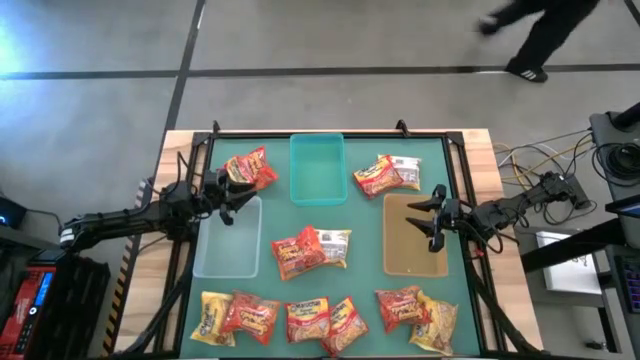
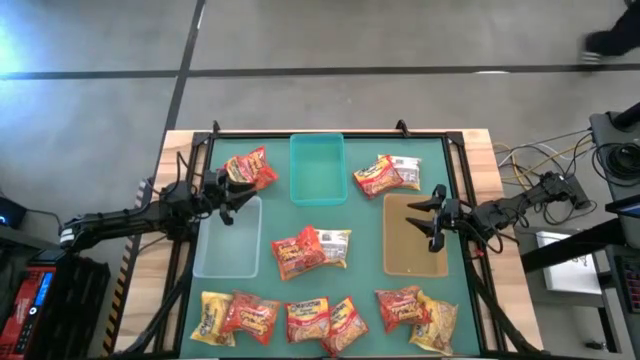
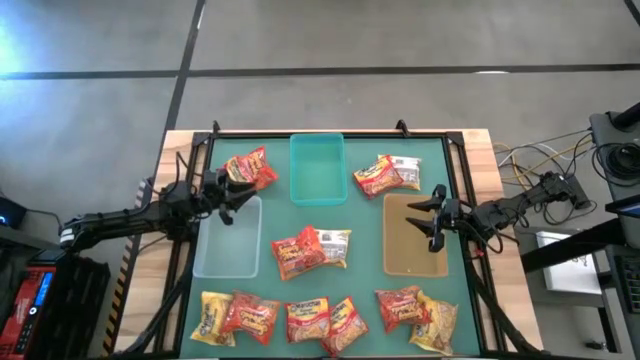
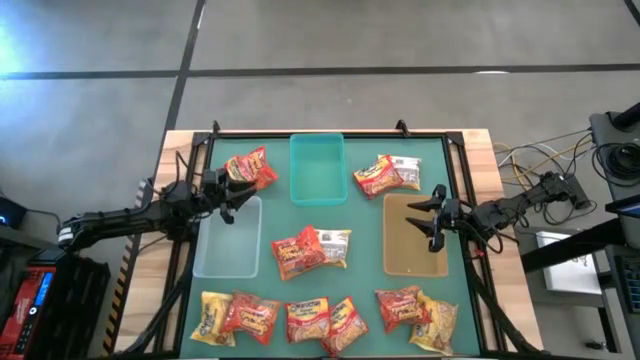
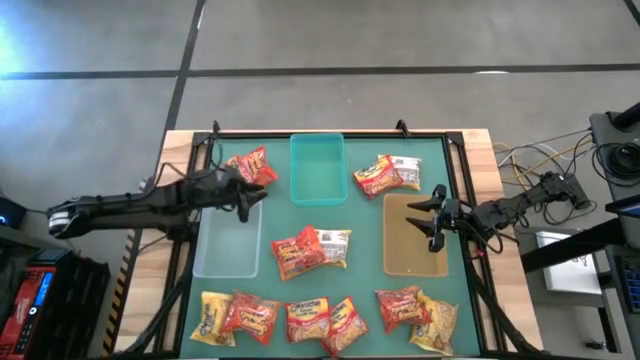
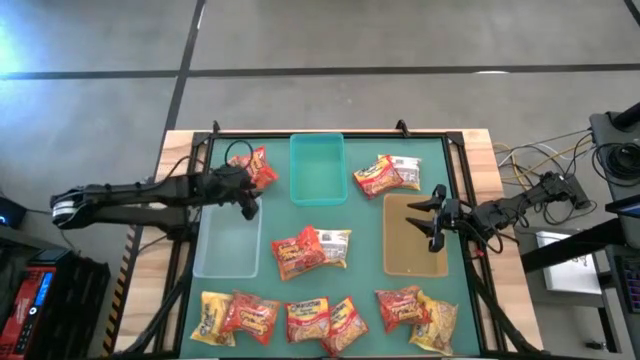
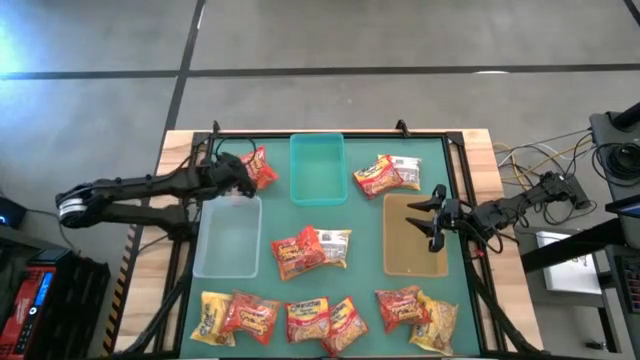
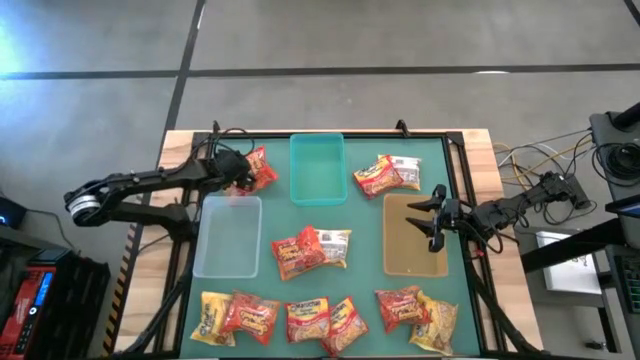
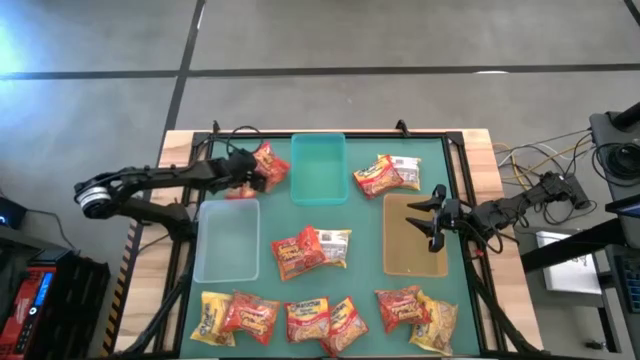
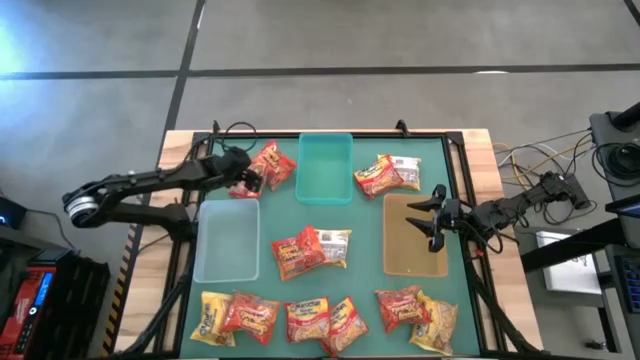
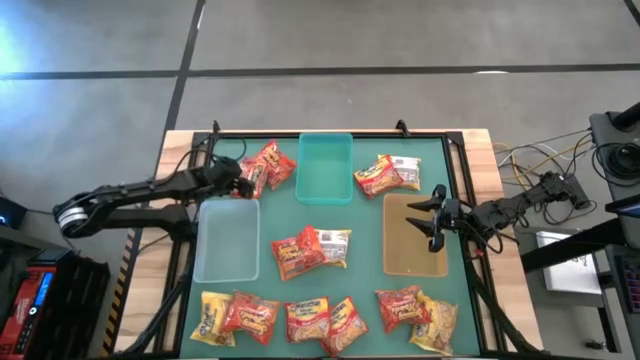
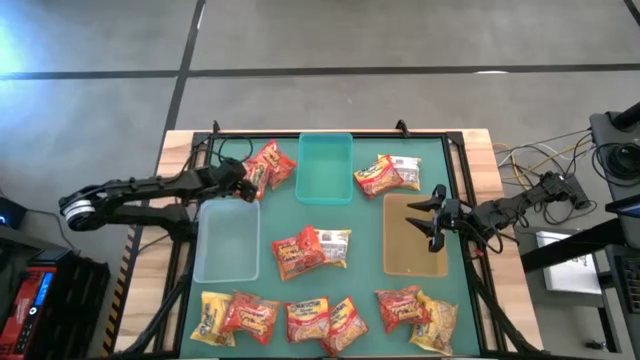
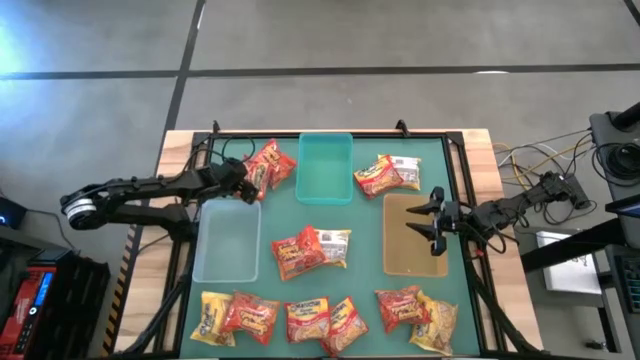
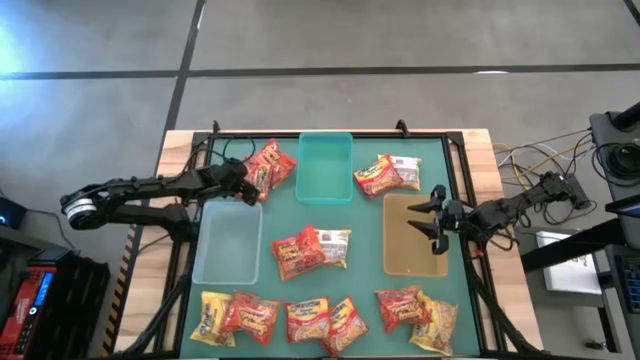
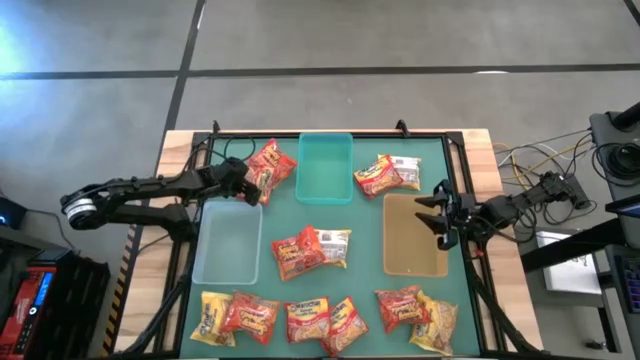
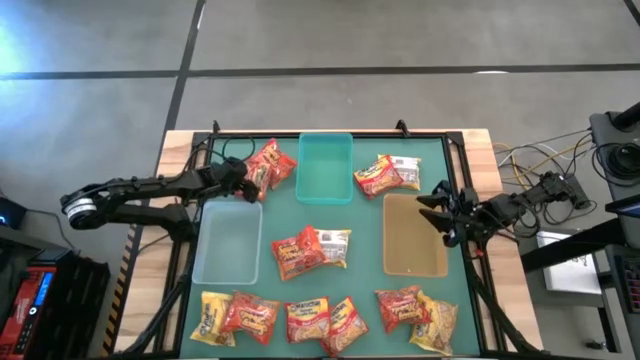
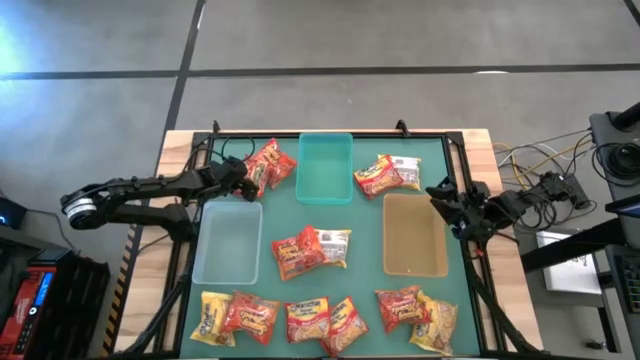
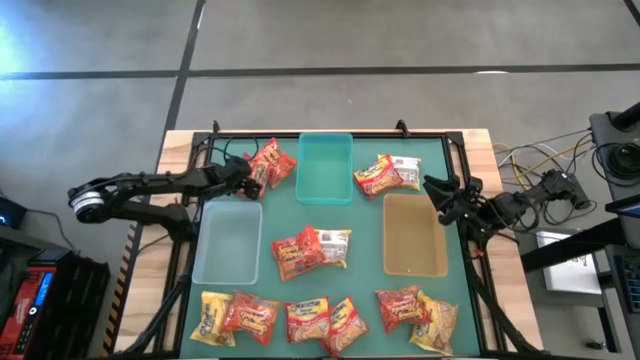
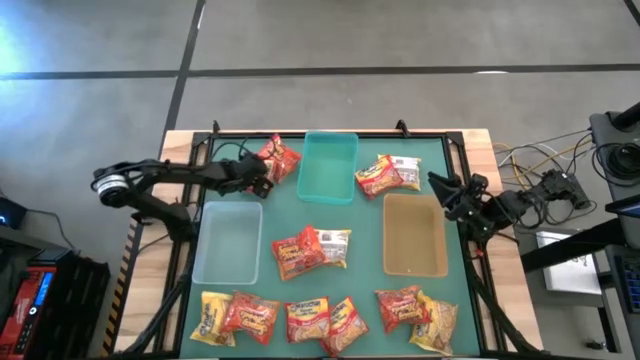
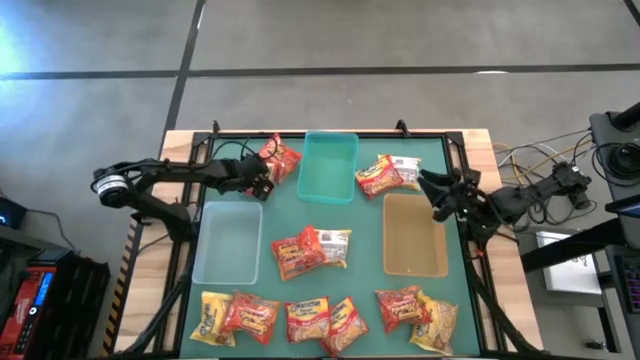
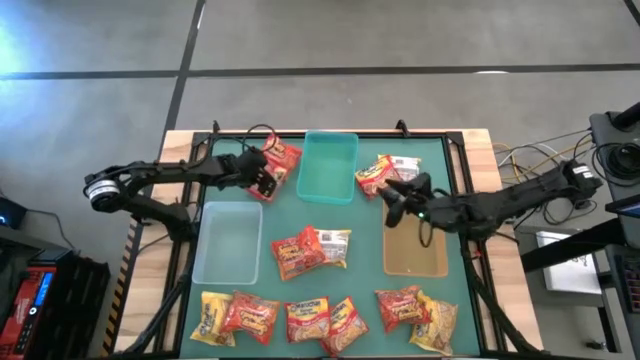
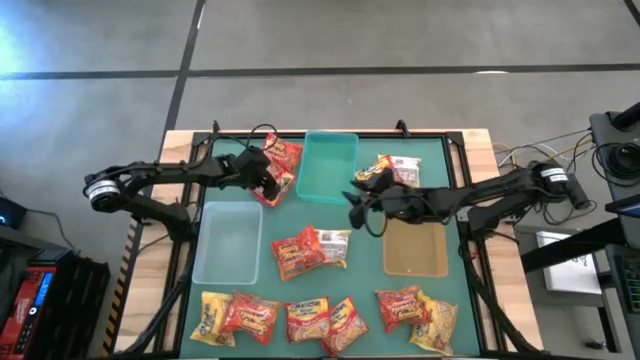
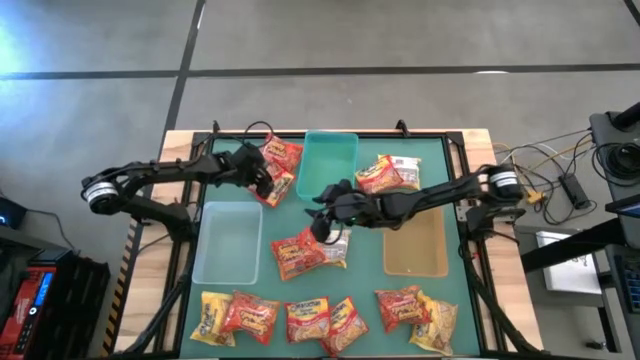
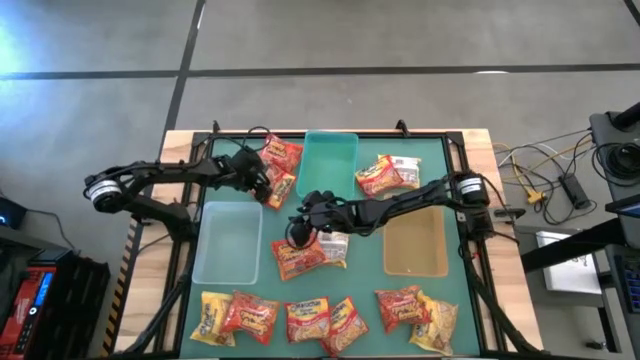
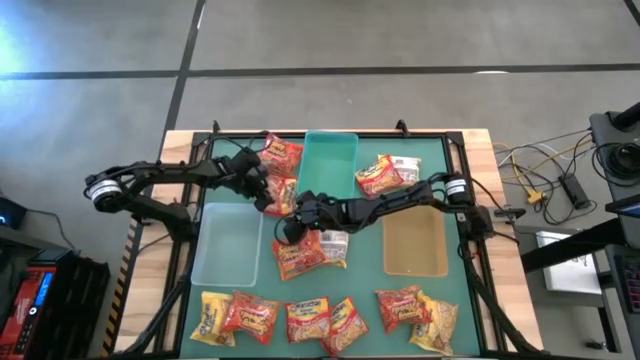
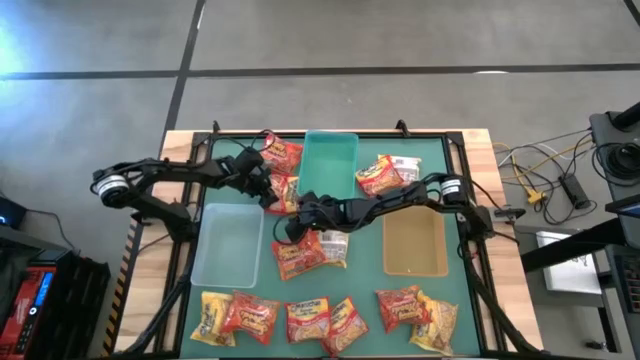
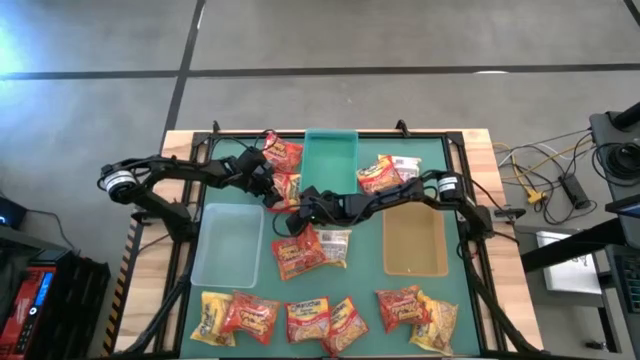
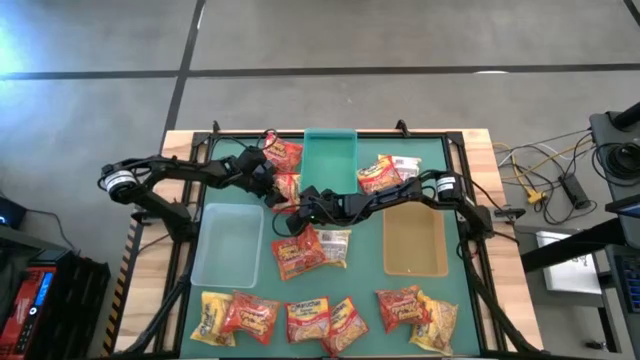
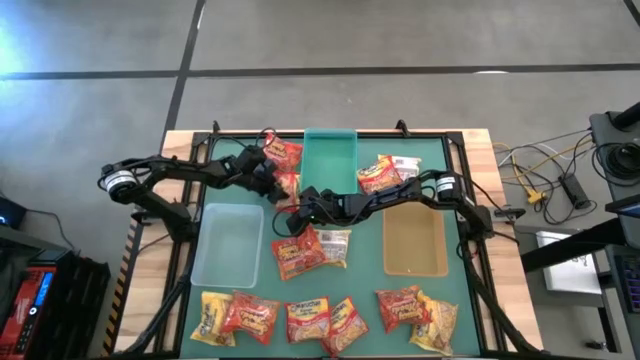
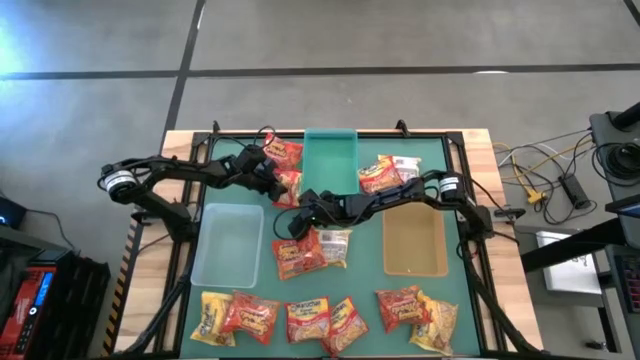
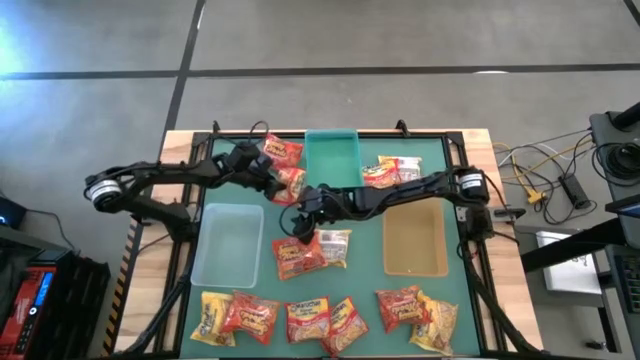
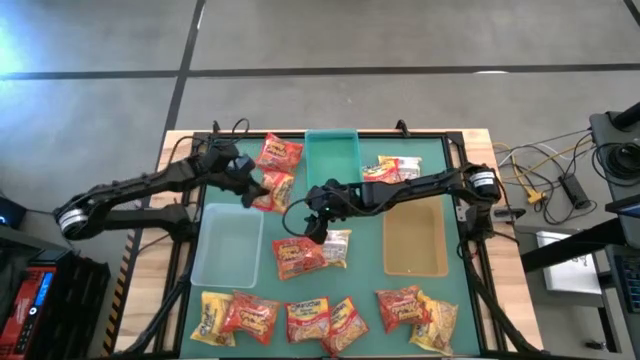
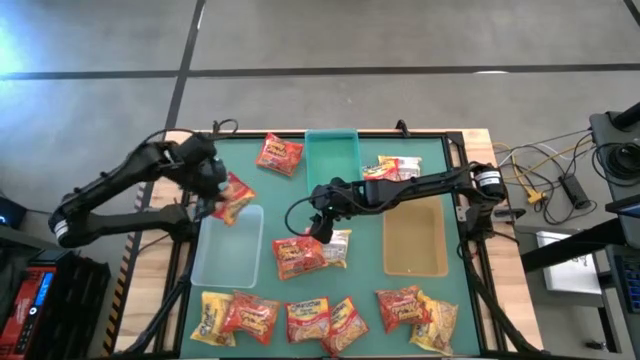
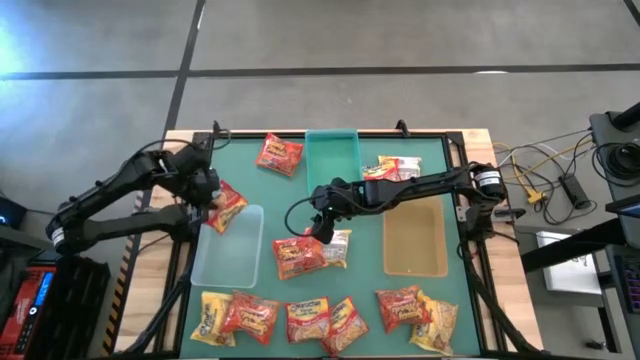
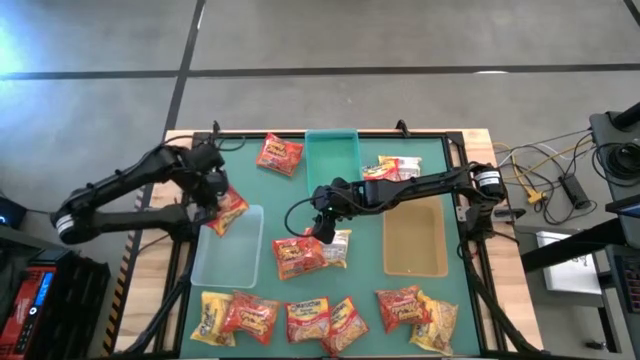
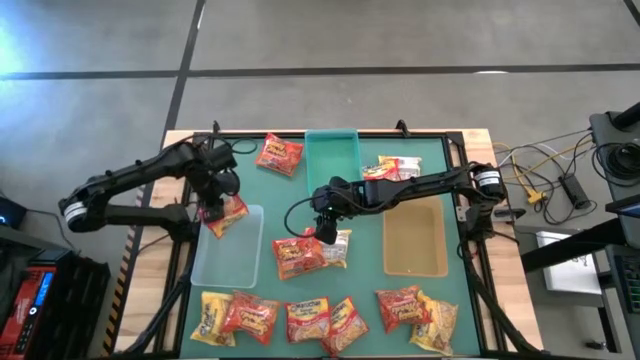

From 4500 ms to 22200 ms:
Task: Sort Maruchan noodles
Put the red noodle pack into the white transparent bin
